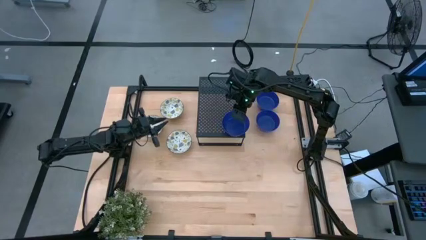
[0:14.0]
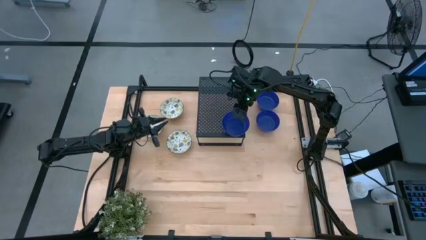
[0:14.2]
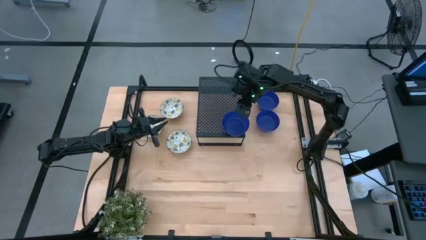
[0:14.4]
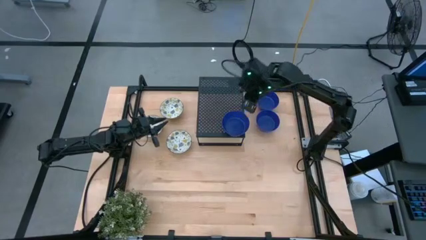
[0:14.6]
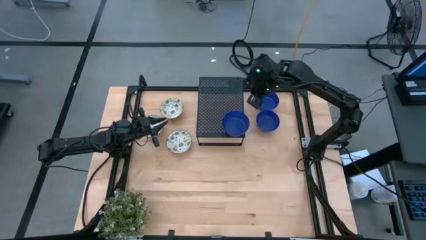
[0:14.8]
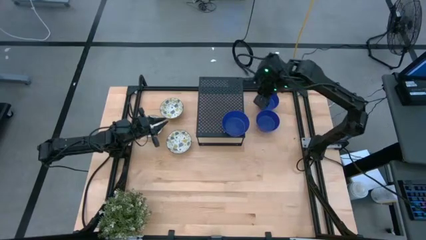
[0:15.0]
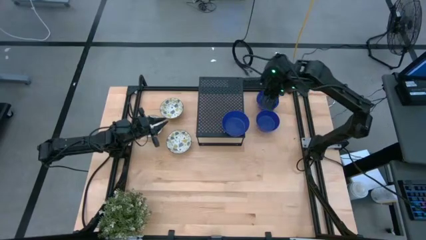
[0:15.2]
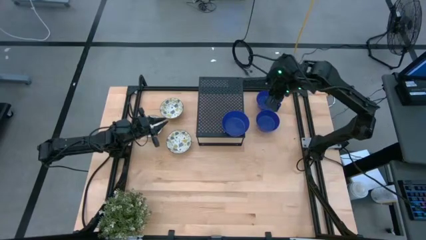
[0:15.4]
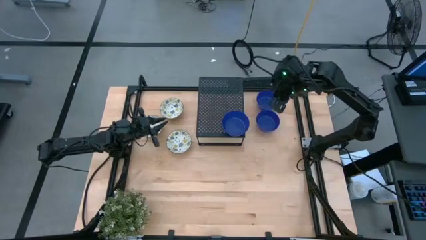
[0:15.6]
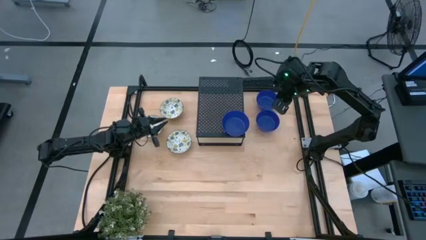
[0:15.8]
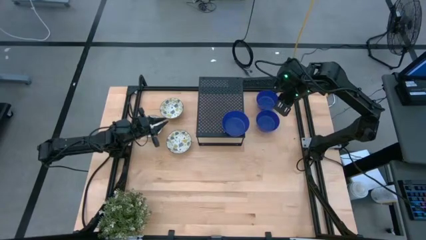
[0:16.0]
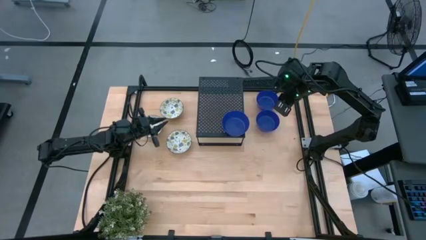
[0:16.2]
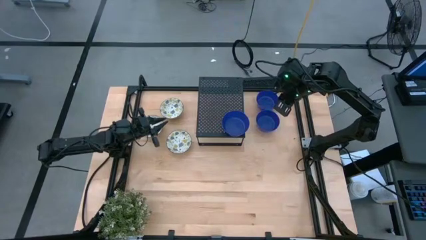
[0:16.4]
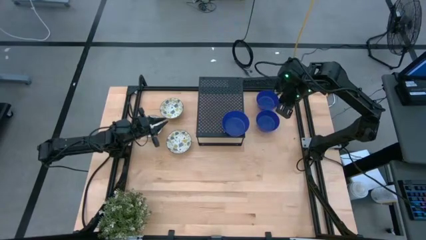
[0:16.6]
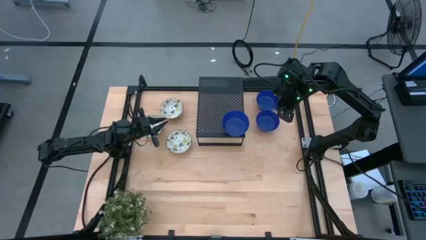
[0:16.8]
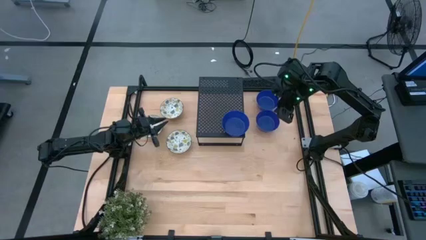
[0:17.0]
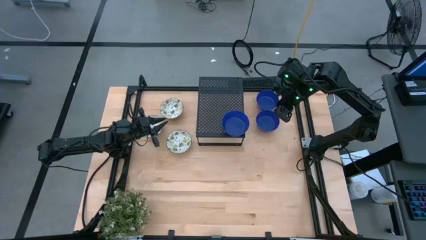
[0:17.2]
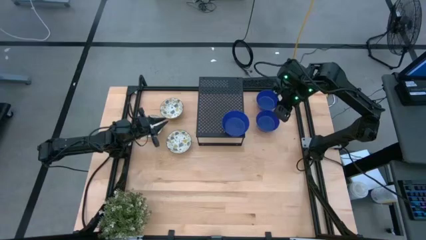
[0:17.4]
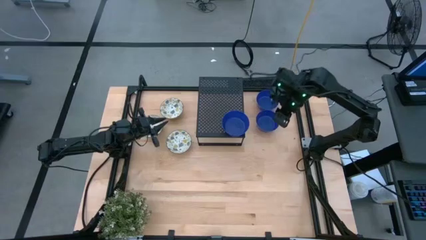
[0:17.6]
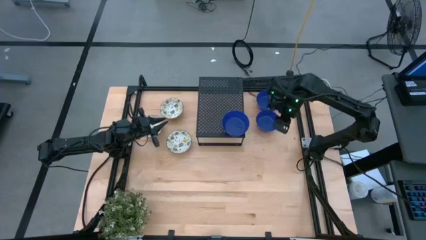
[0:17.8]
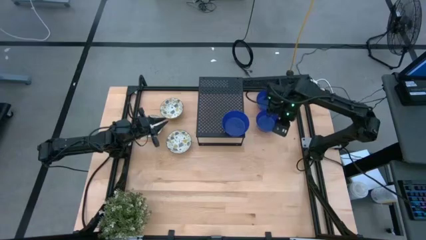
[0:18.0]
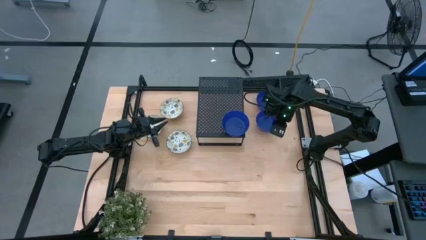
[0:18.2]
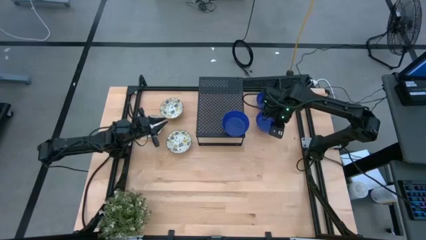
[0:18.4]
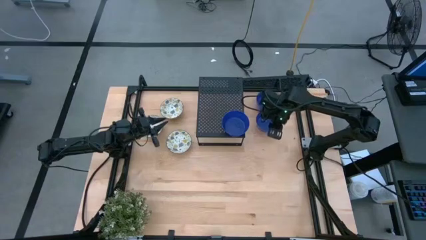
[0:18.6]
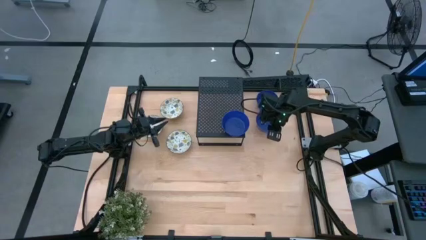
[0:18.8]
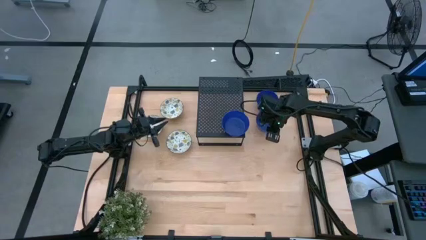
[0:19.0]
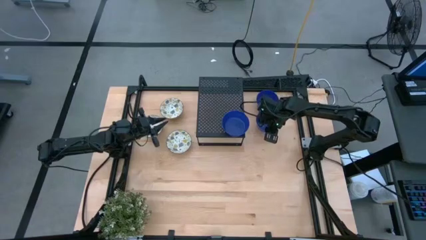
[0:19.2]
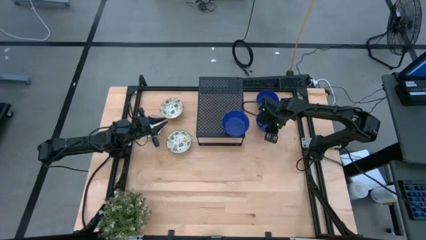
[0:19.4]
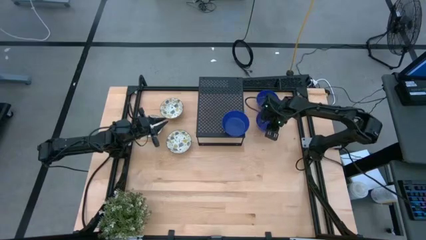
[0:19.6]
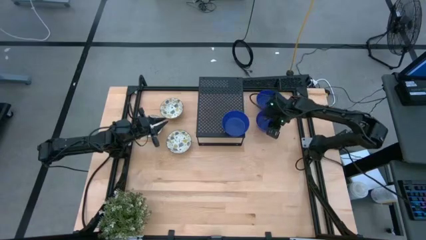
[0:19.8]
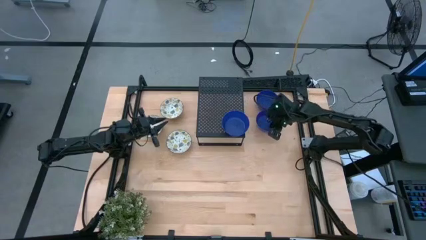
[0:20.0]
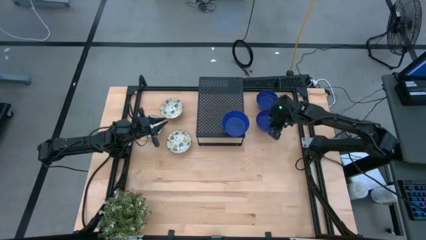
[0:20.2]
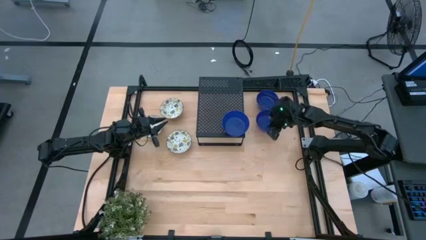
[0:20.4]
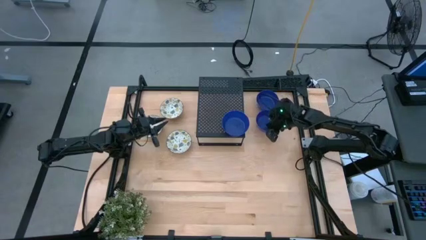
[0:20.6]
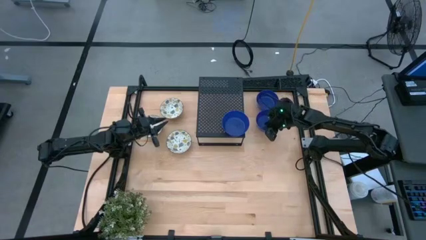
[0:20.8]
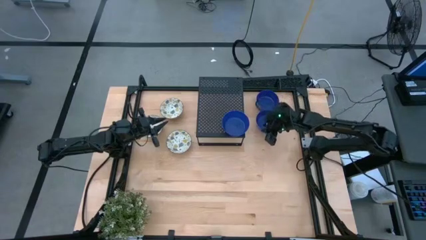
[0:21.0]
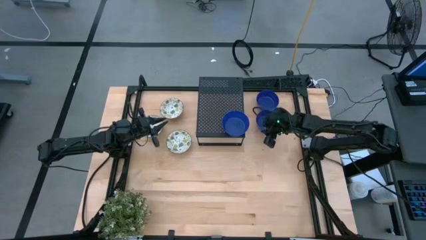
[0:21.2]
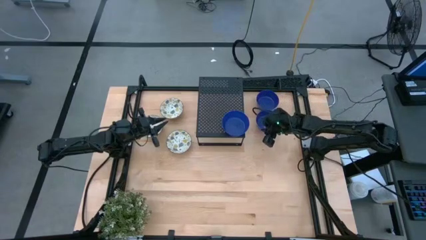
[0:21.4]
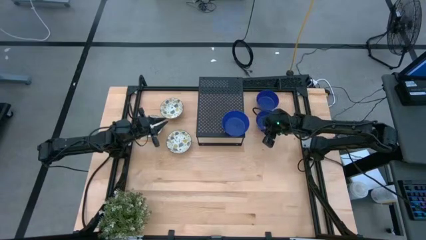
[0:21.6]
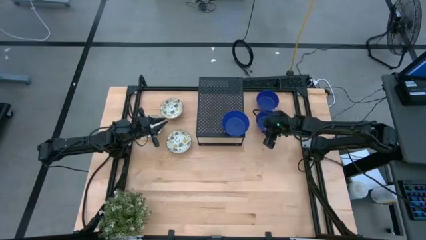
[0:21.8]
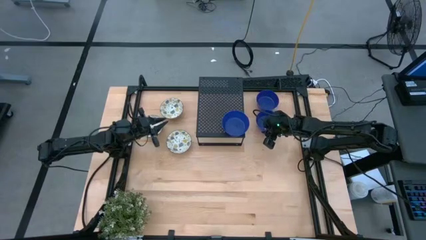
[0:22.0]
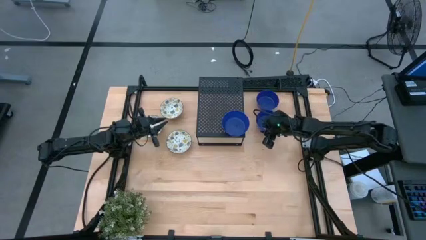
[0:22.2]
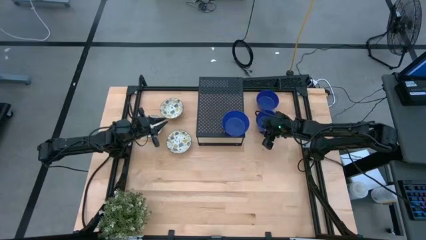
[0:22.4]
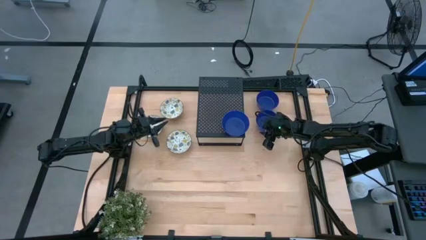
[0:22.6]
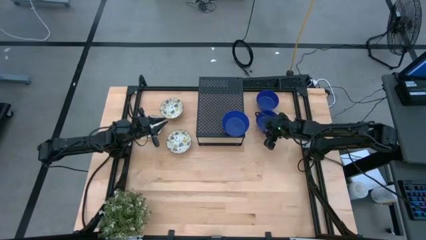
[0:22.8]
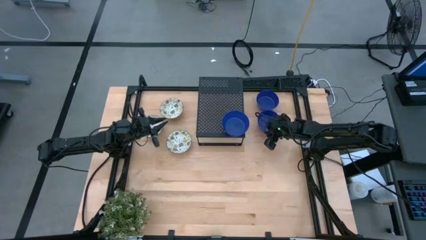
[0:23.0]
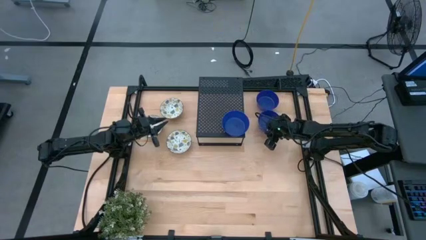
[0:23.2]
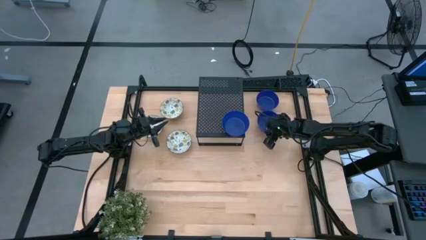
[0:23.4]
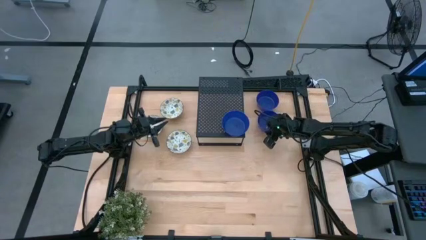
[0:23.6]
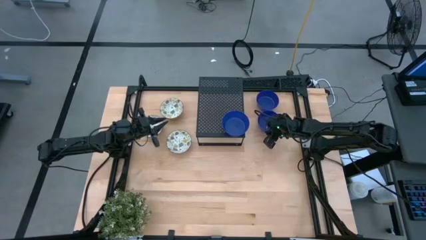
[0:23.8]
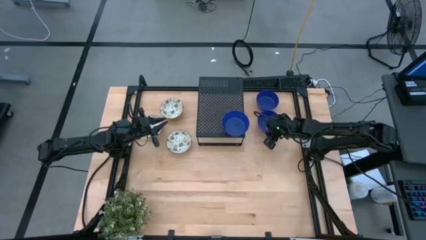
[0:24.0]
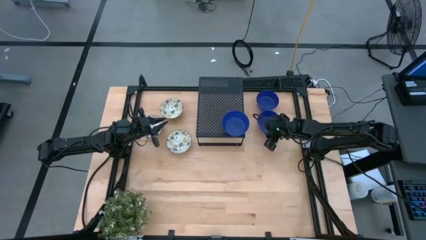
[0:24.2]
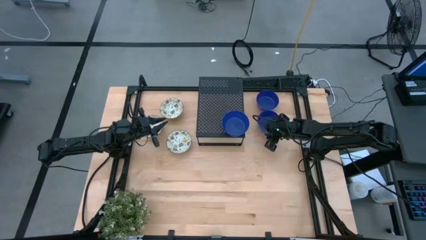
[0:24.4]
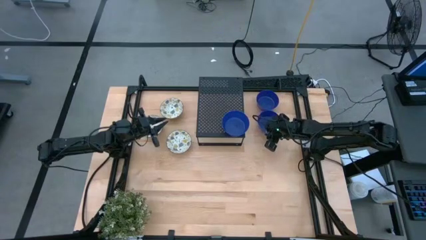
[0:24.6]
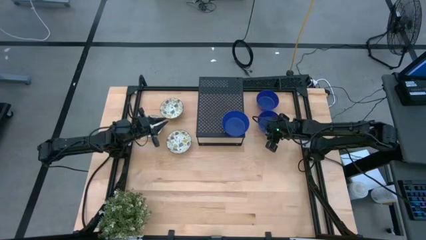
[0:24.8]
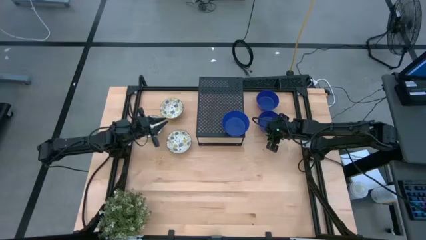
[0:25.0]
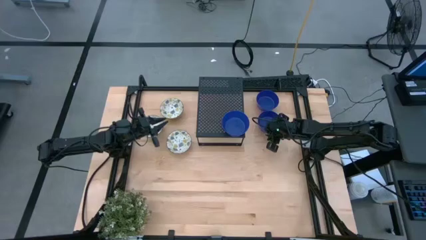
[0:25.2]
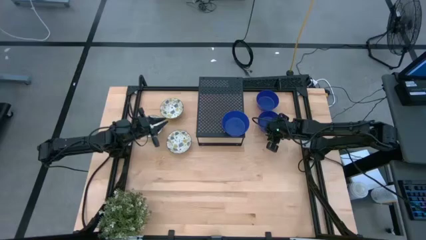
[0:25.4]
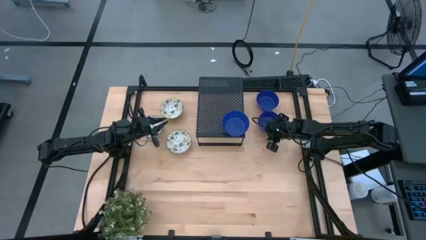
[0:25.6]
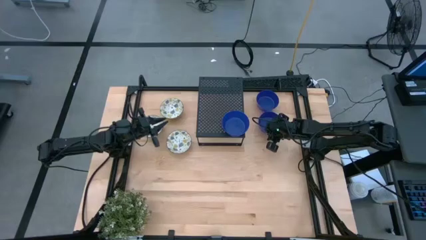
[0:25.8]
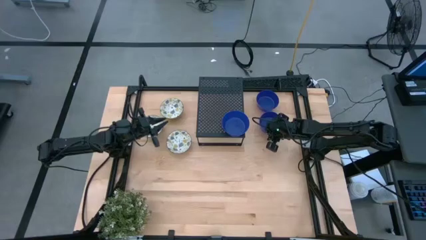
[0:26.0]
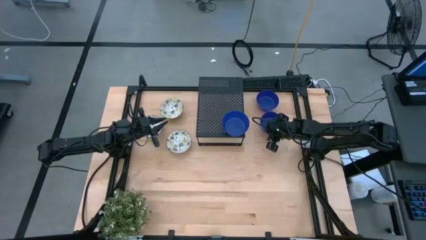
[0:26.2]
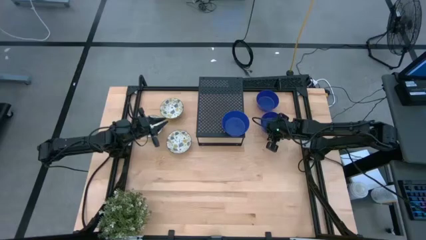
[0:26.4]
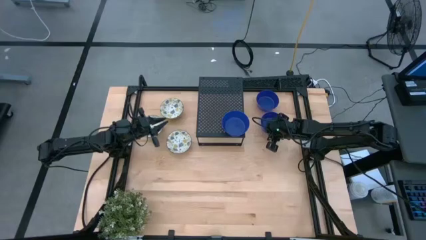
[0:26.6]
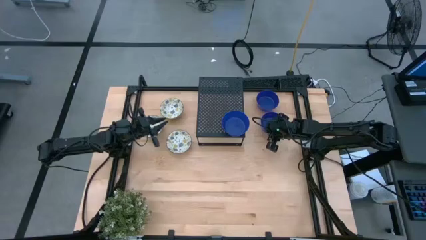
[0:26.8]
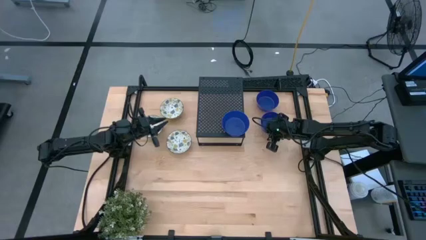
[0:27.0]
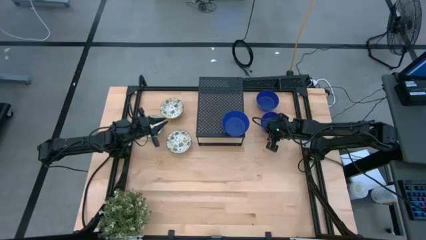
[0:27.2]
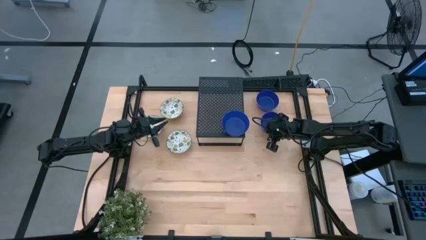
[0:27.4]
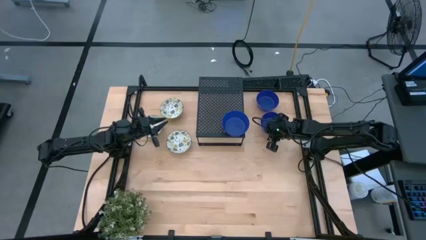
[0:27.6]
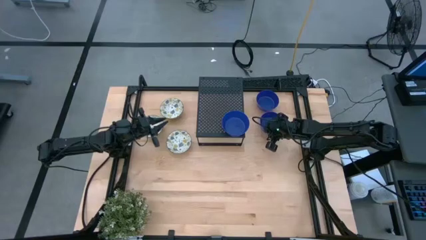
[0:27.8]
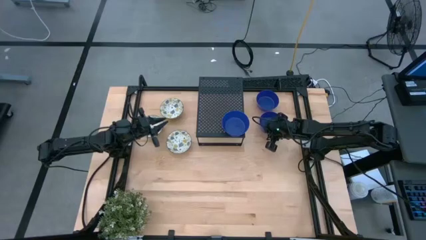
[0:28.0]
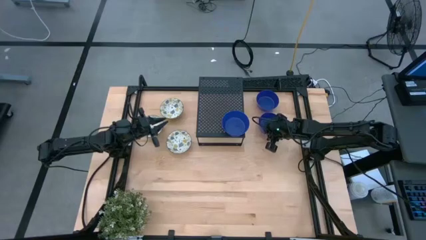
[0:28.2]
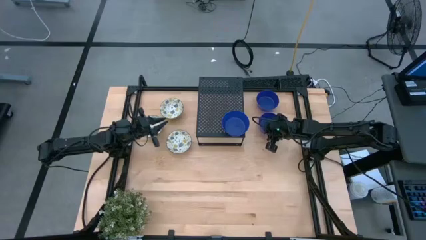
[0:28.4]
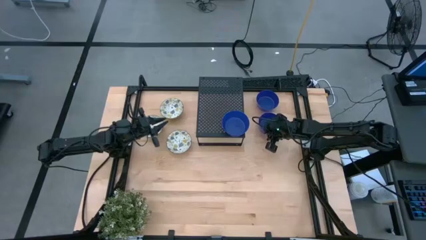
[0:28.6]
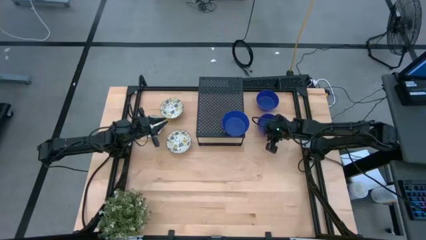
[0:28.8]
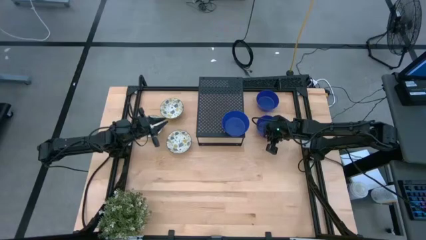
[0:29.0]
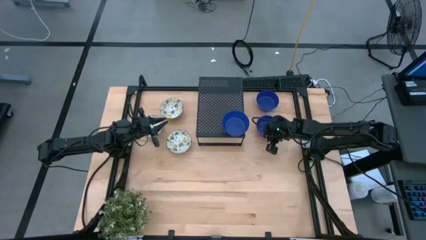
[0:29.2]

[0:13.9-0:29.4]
Task: Pick & Place Mini bowls
Stack the bottom blue bowl on the blue bowl on the shelf
